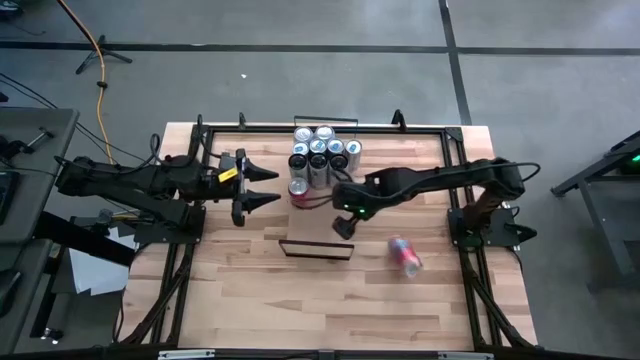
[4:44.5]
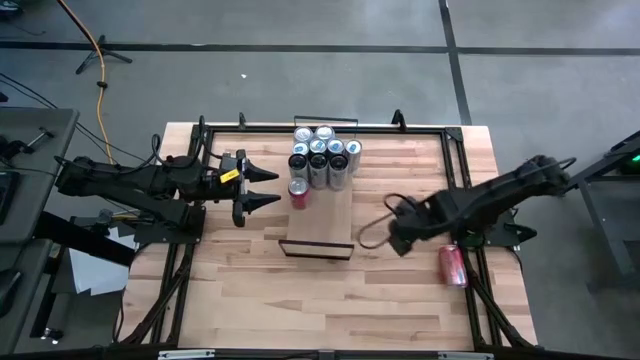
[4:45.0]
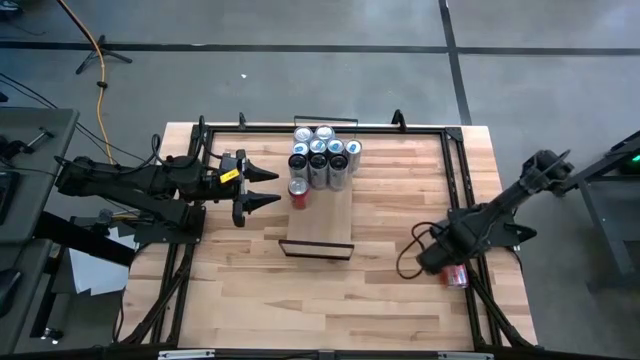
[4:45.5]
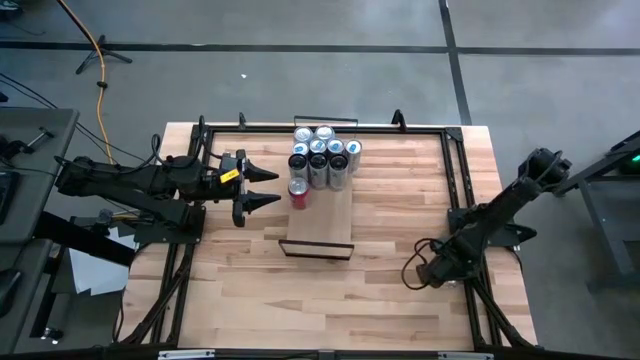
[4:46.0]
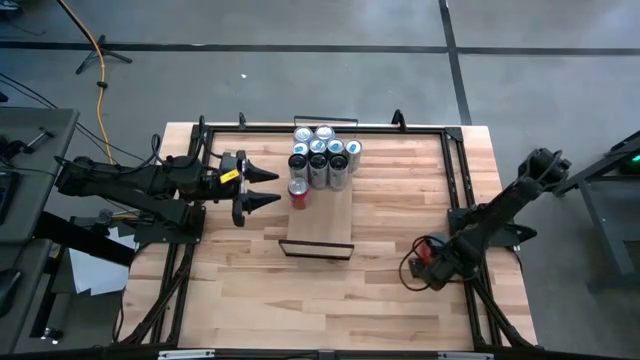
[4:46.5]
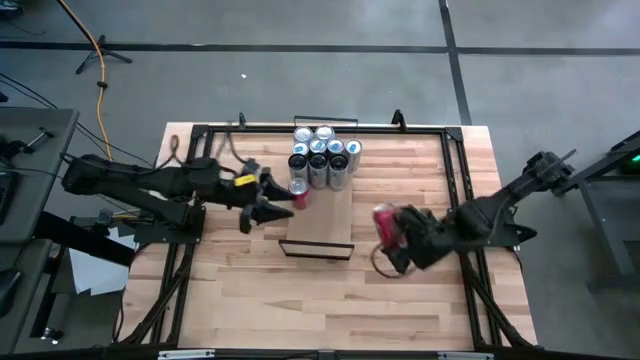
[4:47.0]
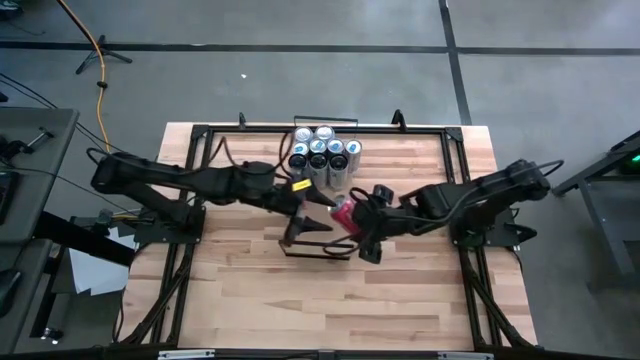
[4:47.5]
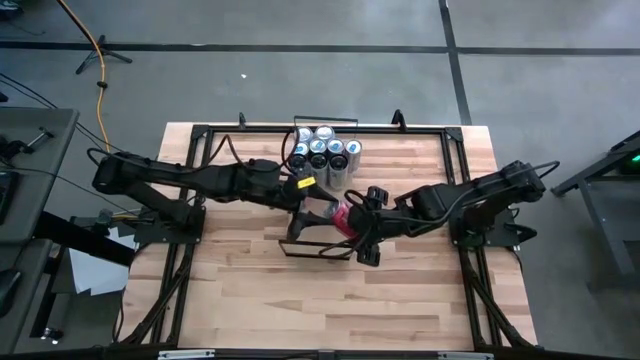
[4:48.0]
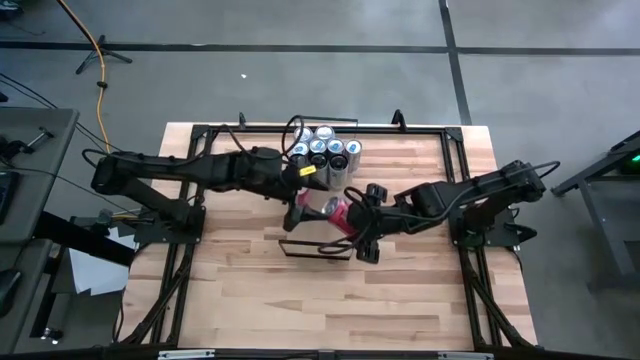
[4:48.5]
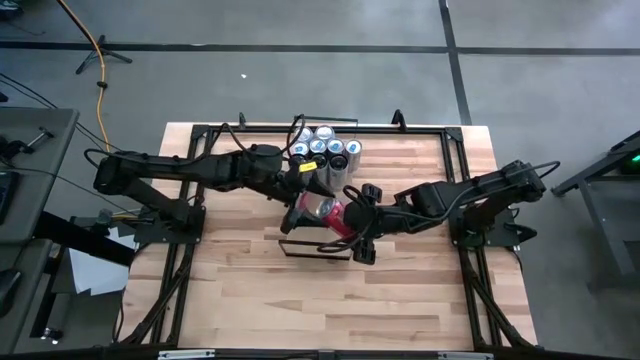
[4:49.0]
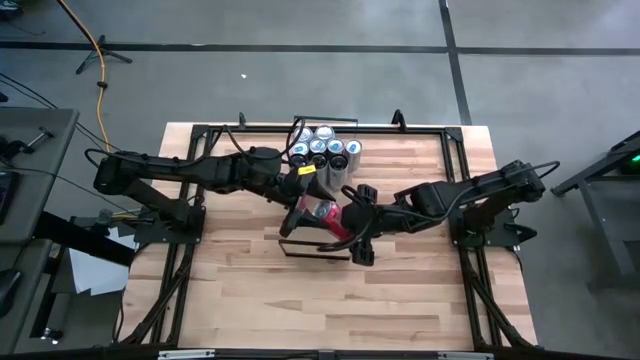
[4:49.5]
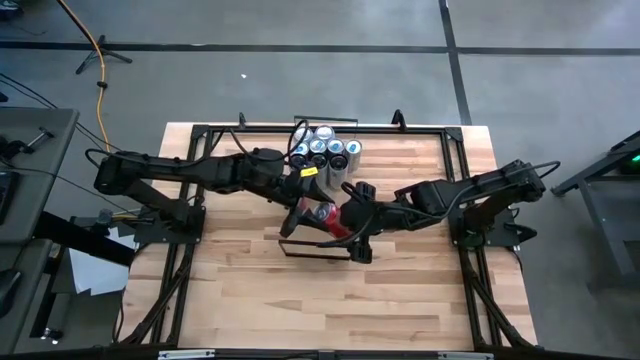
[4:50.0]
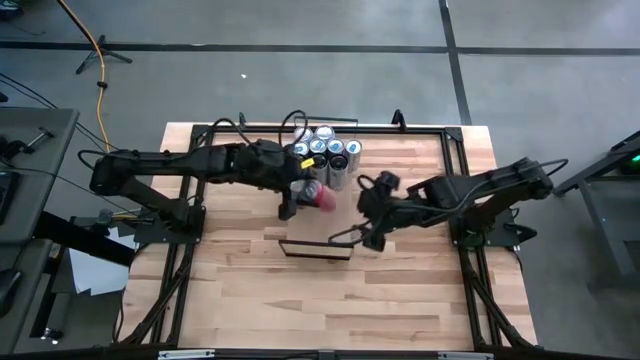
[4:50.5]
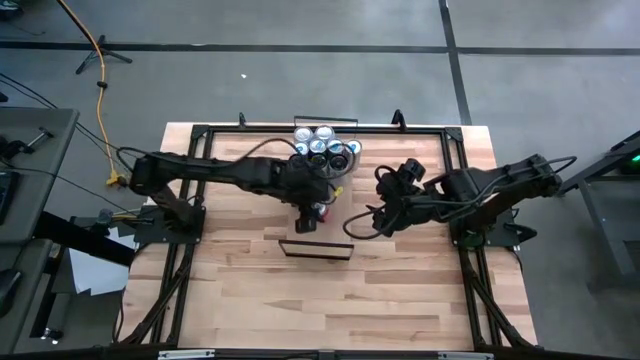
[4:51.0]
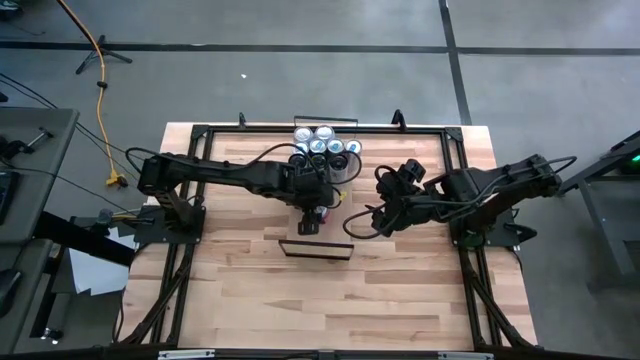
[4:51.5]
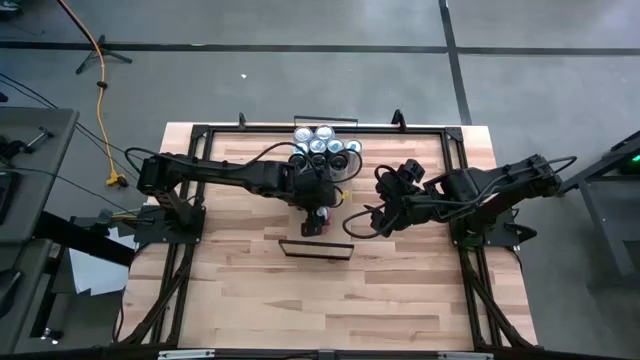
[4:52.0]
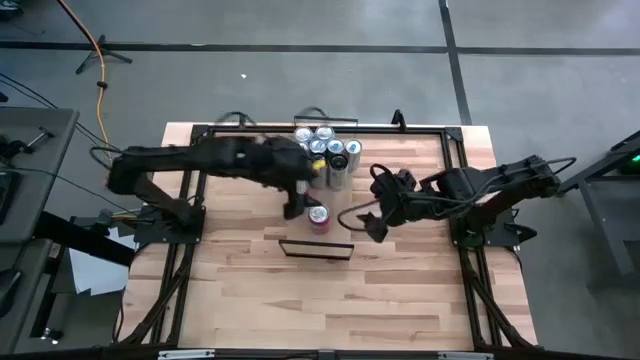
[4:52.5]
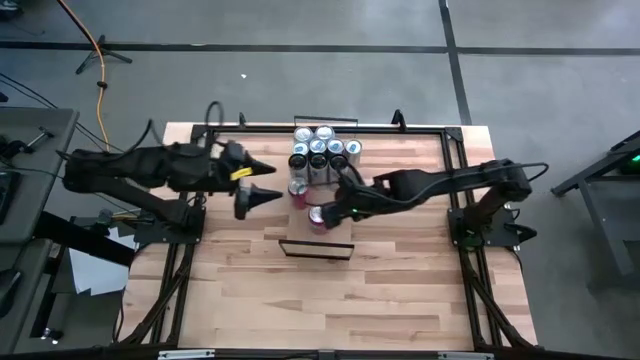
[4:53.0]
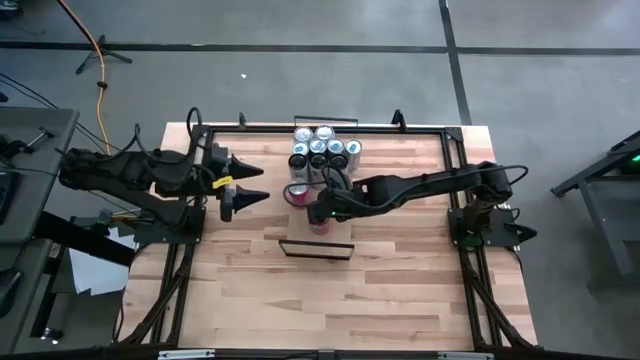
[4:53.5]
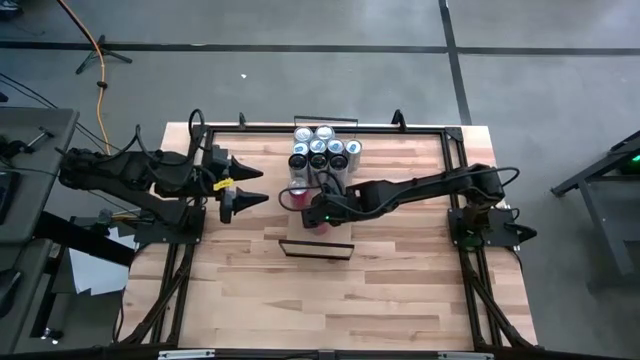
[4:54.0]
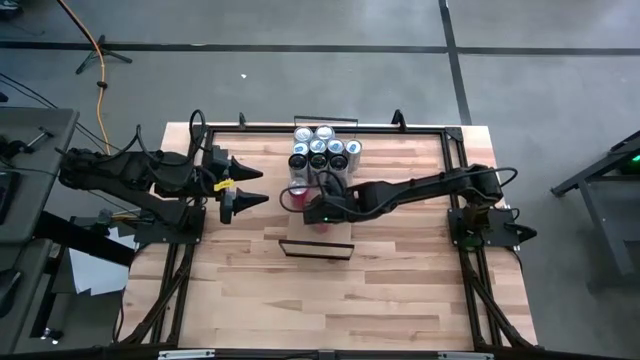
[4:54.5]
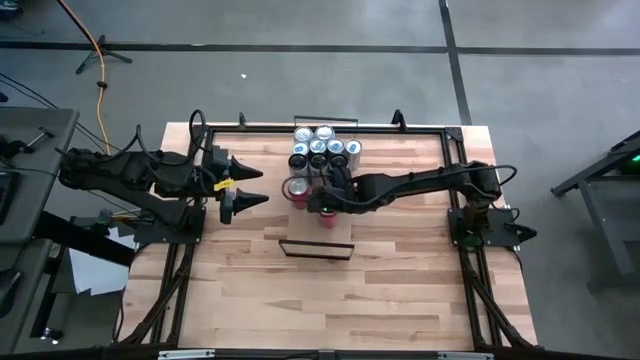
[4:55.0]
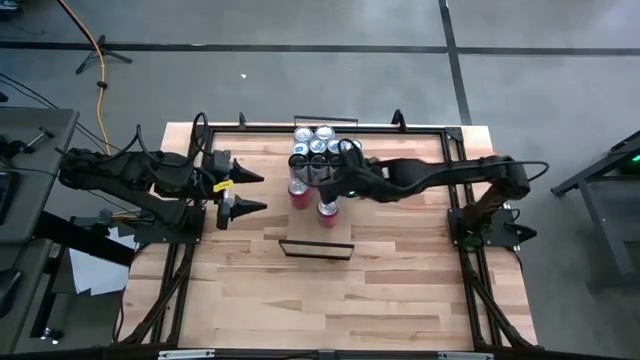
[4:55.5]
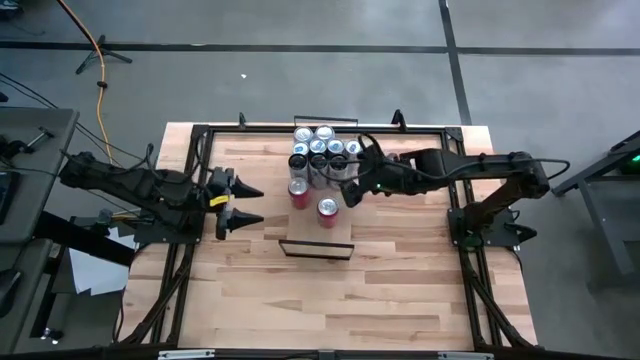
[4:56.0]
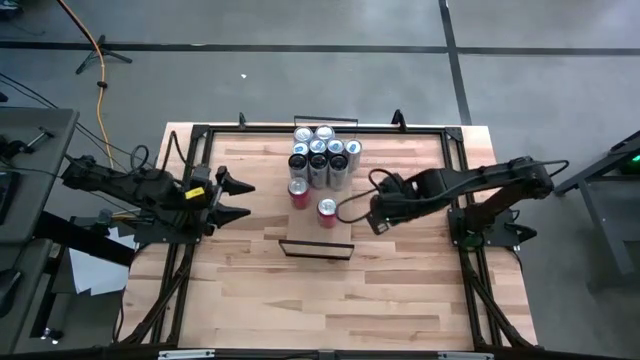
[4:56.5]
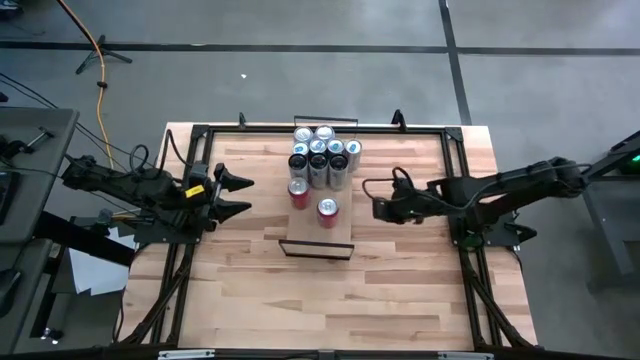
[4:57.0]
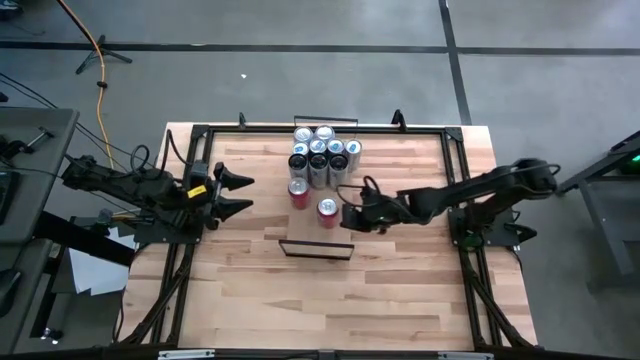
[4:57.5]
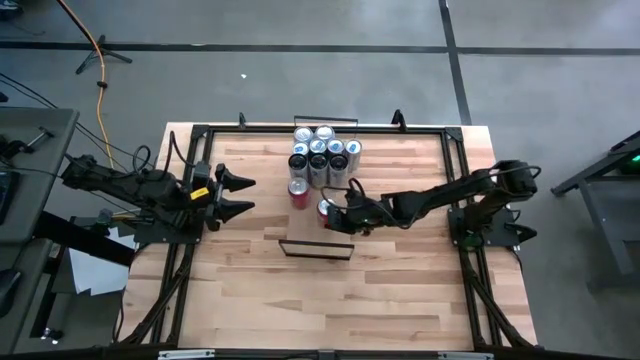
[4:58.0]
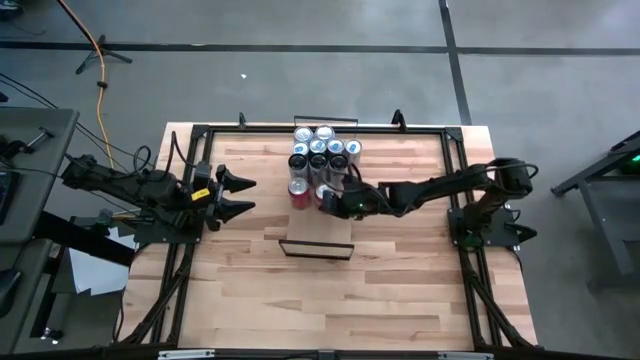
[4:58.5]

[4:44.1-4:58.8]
Task: Place canned beverage on shelf
Put the red soda can on the shelf aligned with the other red soda can

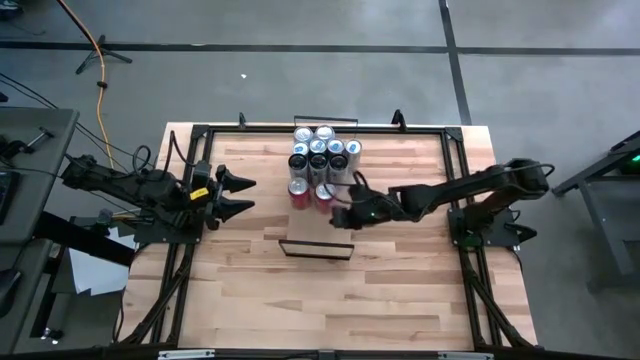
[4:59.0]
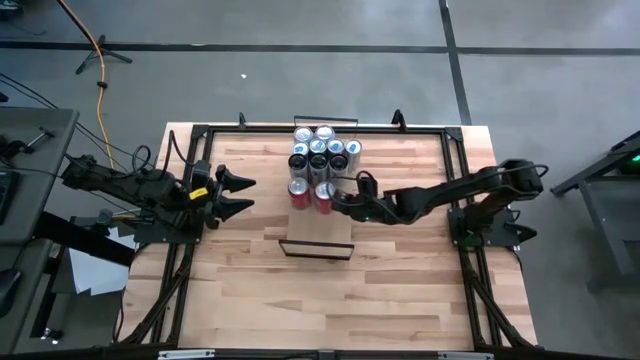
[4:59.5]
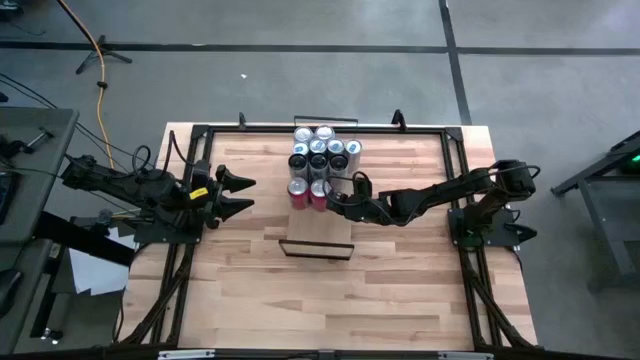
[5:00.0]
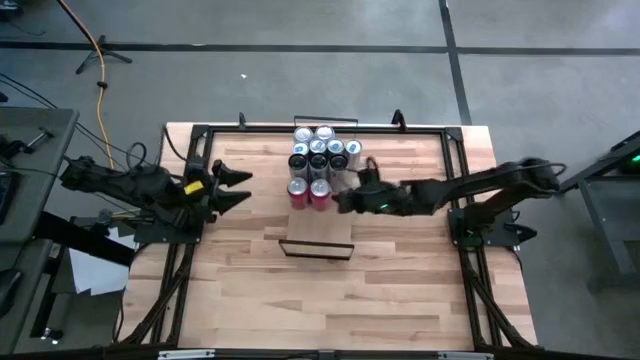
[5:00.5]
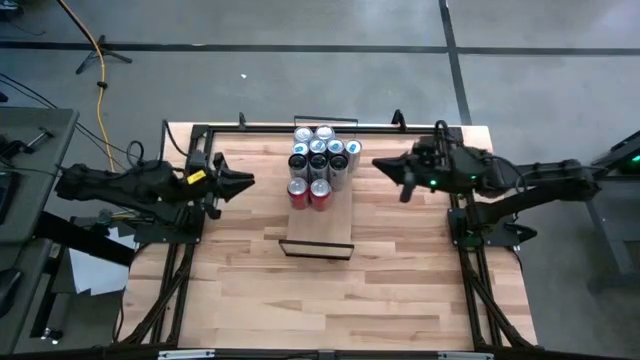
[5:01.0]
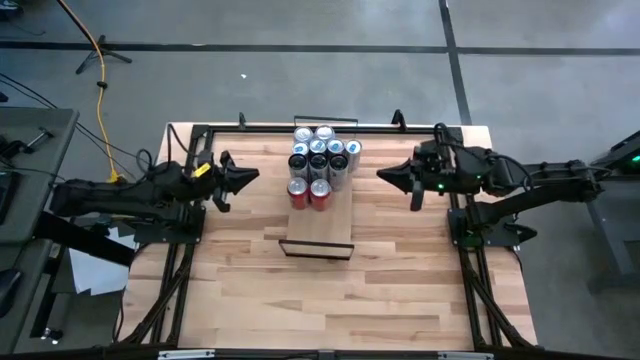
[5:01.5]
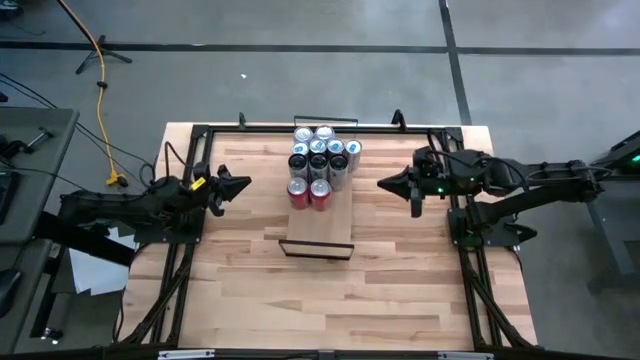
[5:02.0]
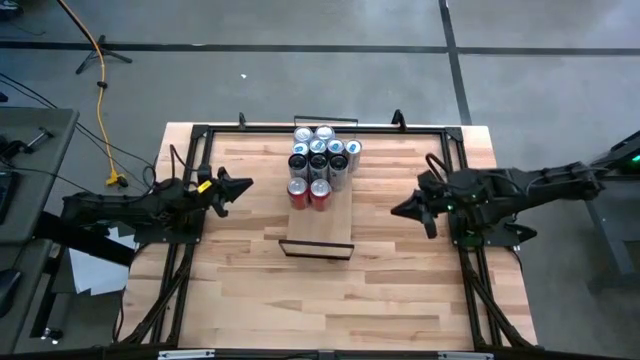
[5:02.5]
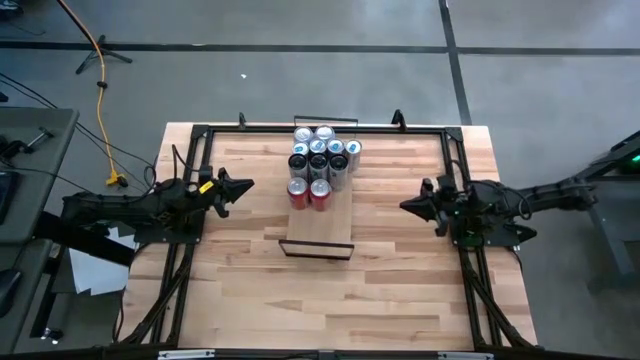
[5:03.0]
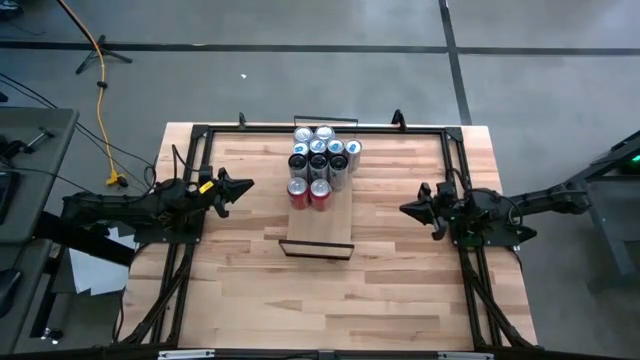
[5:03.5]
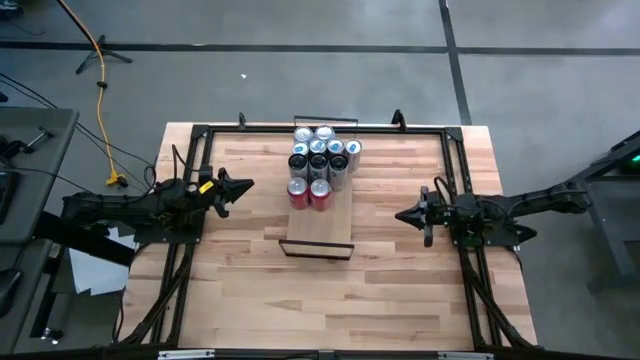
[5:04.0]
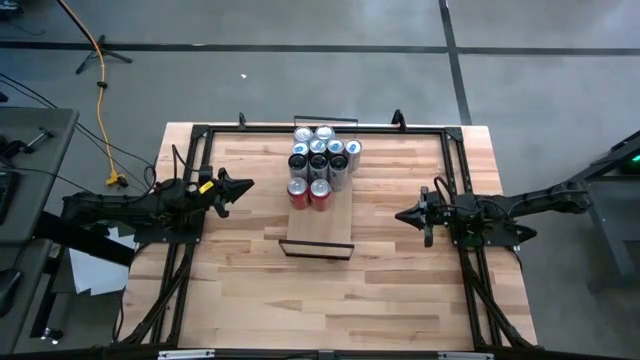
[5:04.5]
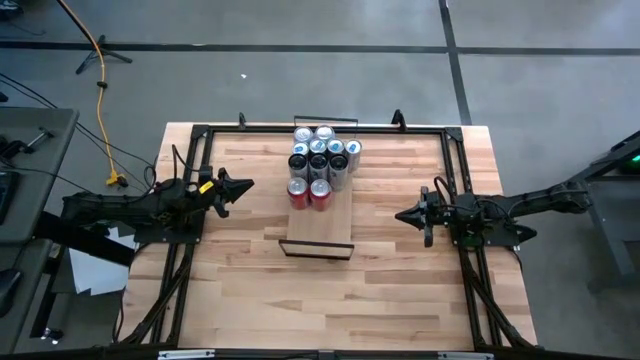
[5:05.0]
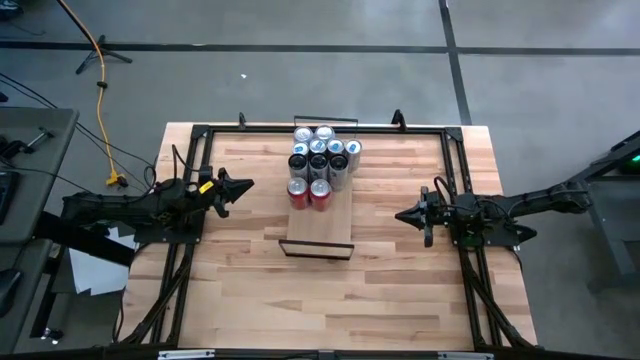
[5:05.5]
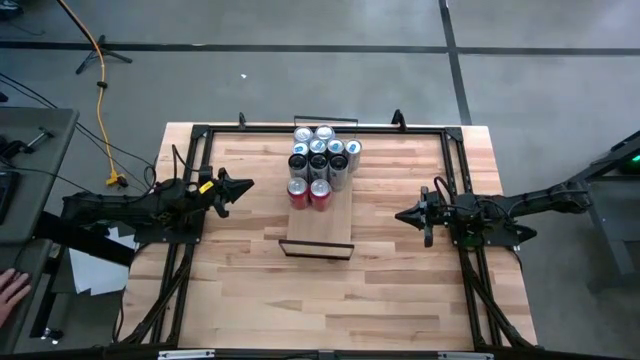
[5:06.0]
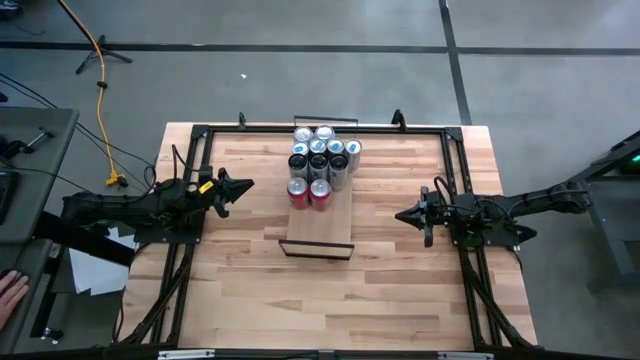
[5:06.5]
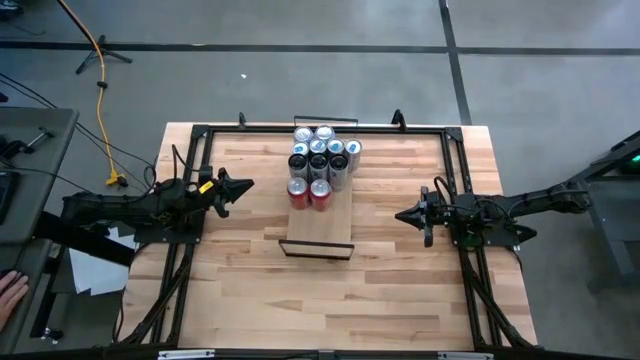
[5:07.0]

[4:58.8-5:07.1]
Return to Home Position
